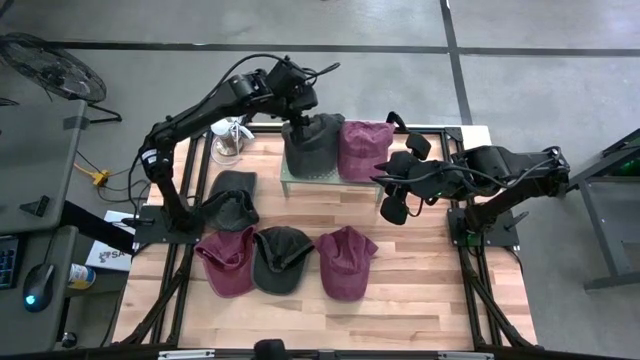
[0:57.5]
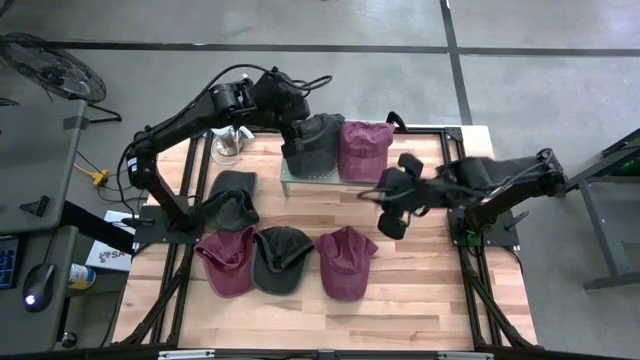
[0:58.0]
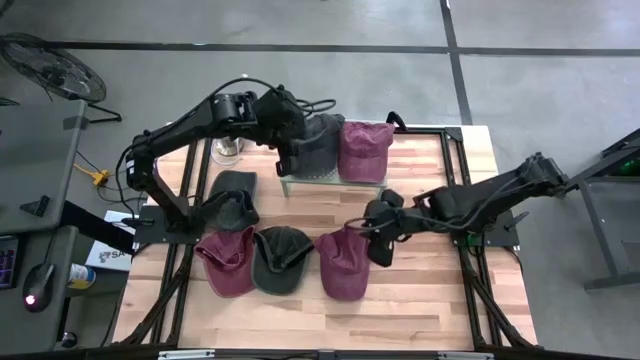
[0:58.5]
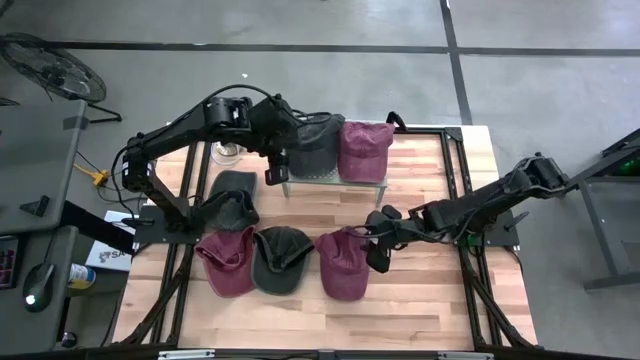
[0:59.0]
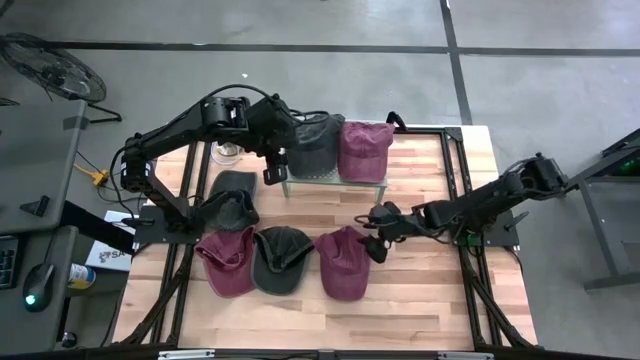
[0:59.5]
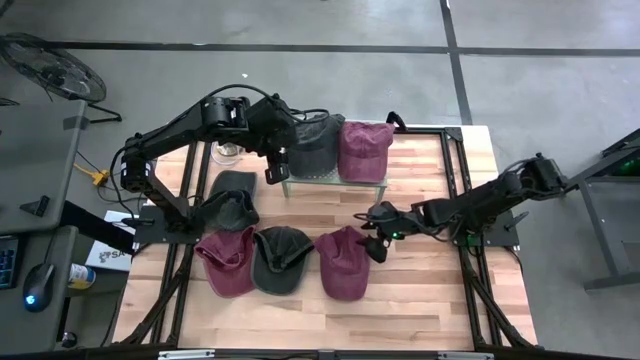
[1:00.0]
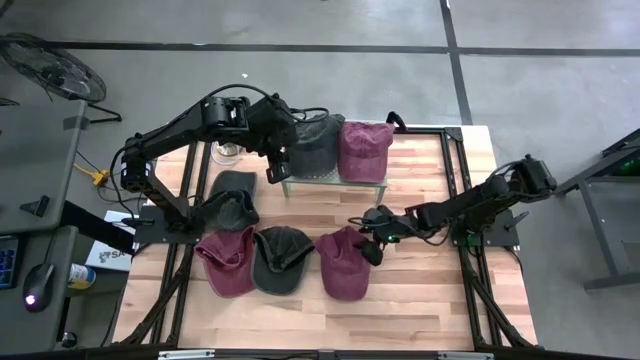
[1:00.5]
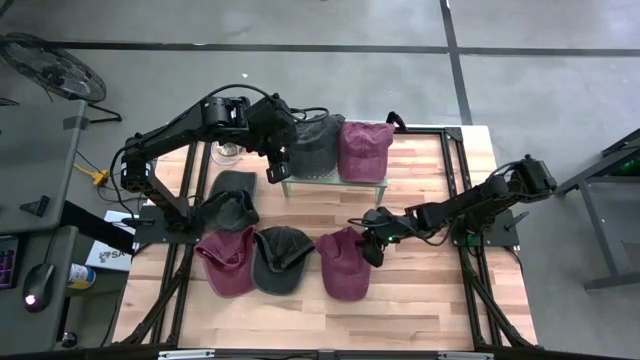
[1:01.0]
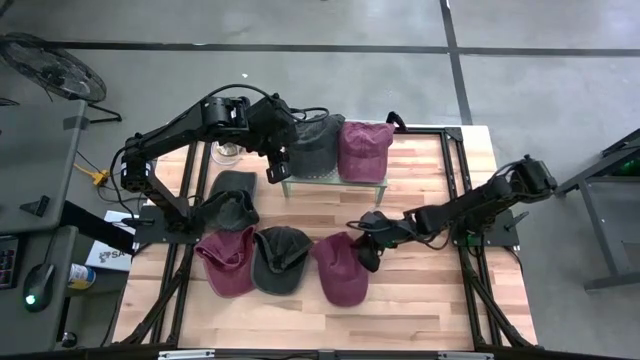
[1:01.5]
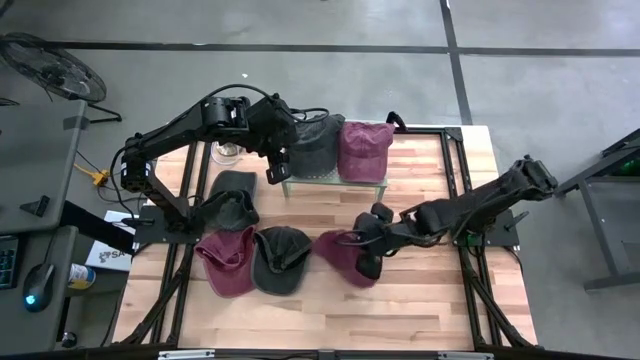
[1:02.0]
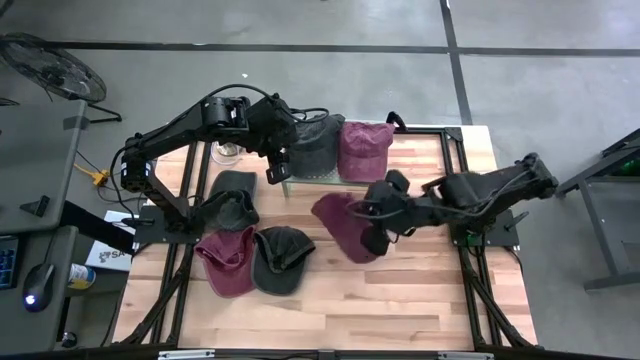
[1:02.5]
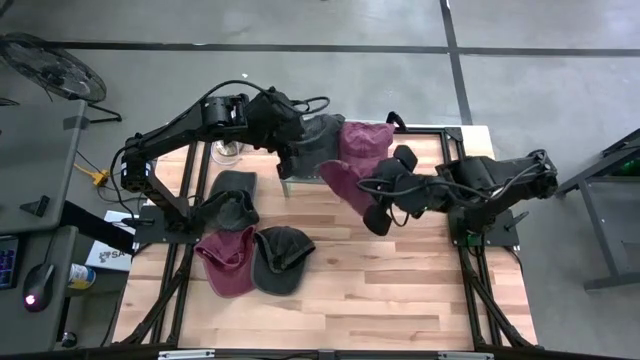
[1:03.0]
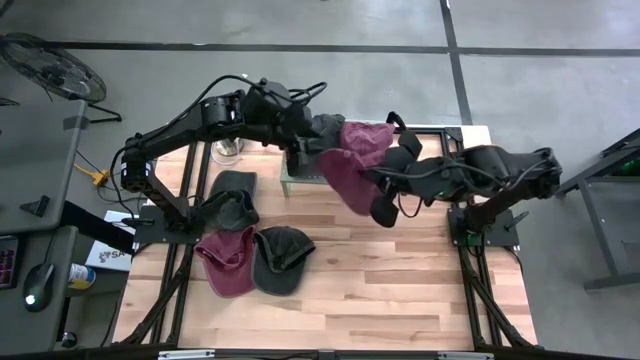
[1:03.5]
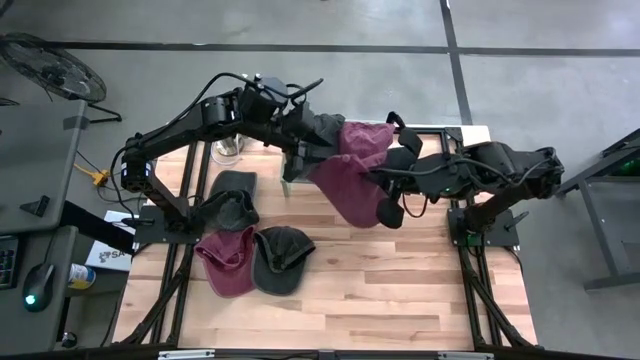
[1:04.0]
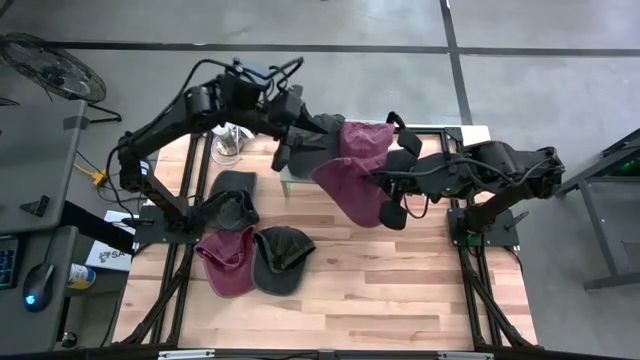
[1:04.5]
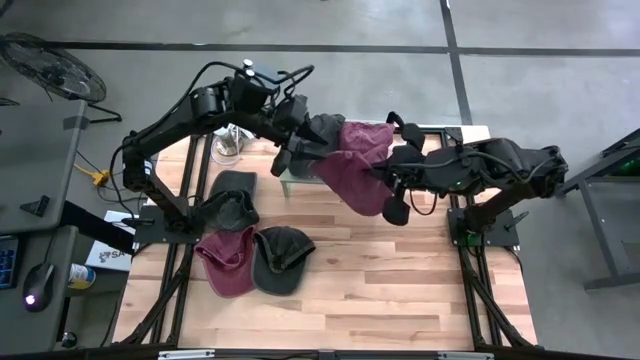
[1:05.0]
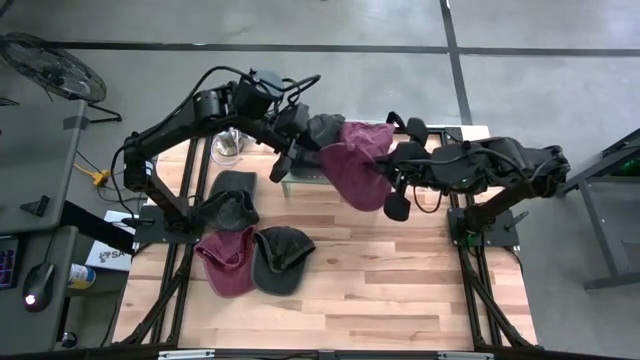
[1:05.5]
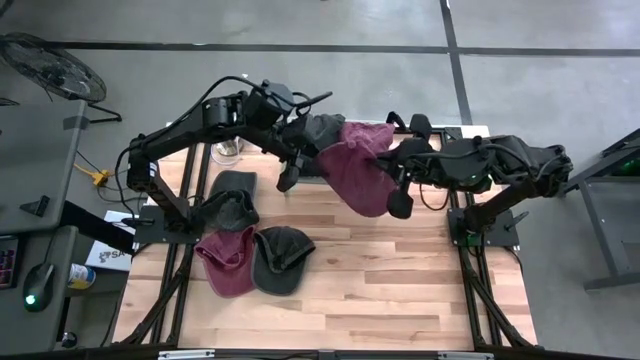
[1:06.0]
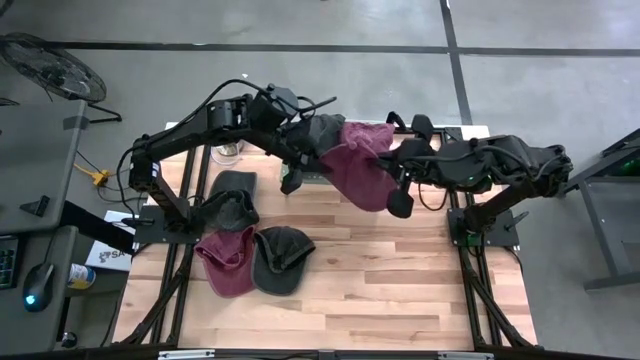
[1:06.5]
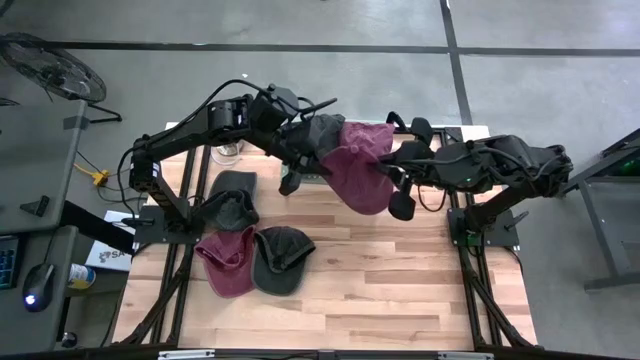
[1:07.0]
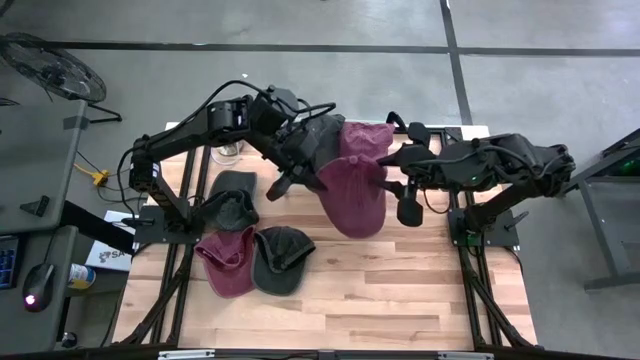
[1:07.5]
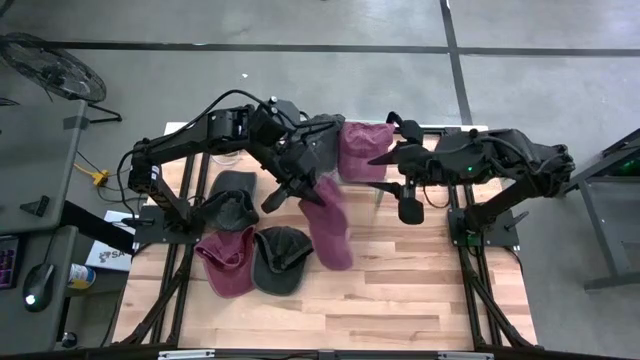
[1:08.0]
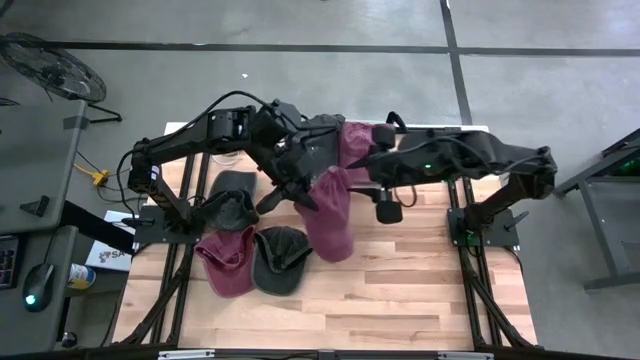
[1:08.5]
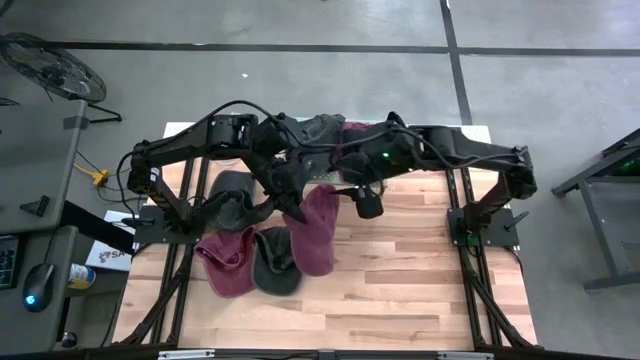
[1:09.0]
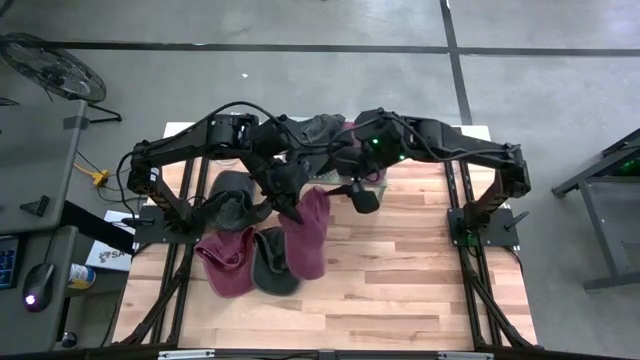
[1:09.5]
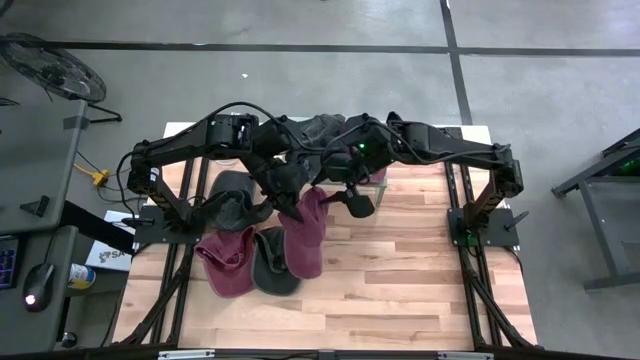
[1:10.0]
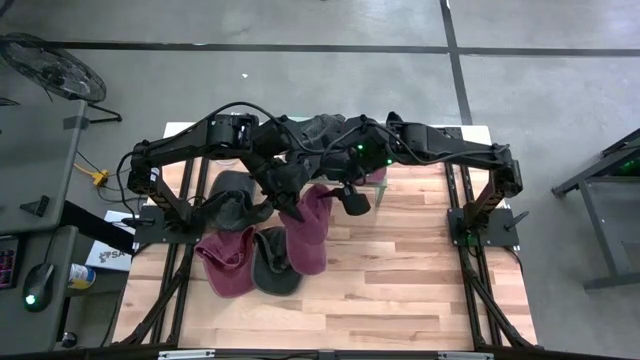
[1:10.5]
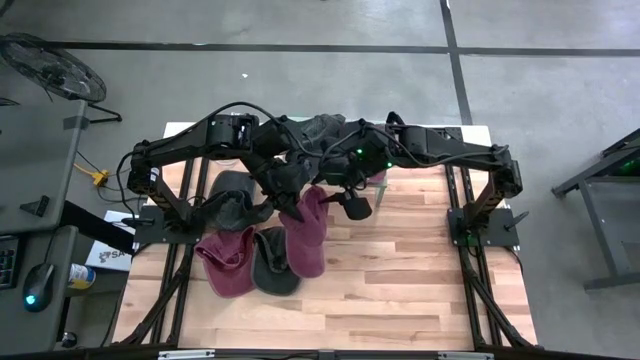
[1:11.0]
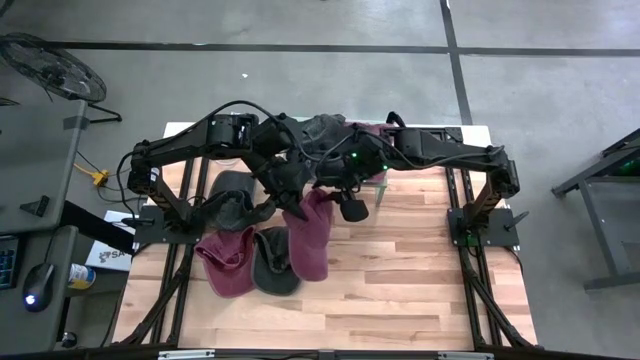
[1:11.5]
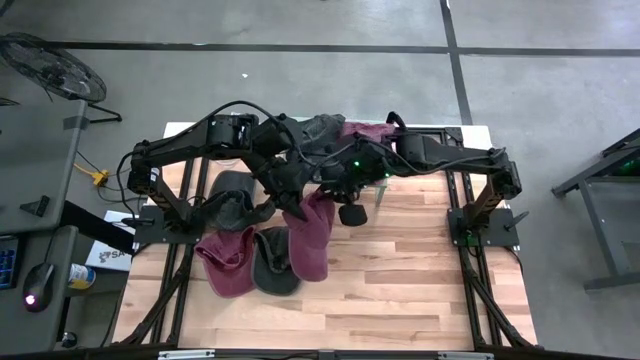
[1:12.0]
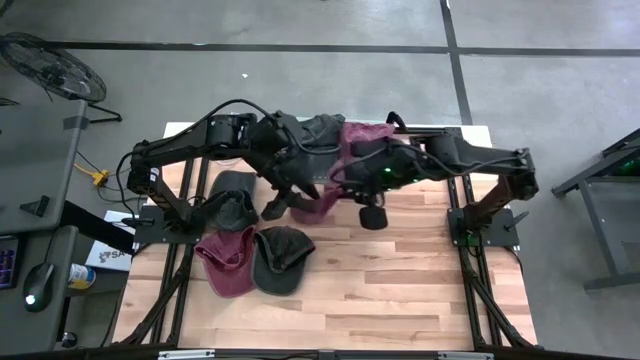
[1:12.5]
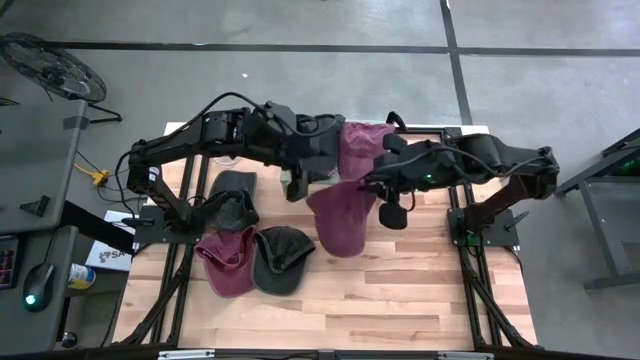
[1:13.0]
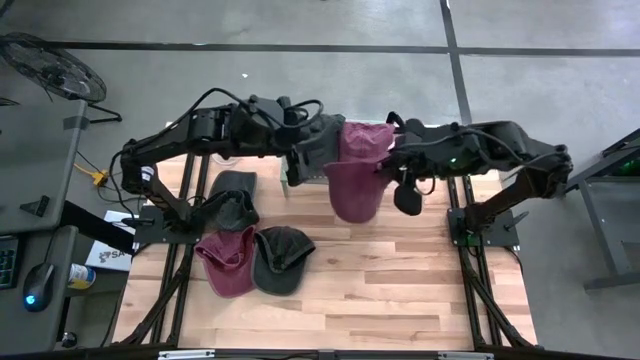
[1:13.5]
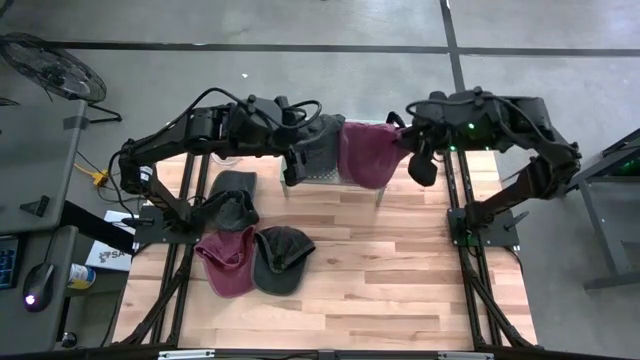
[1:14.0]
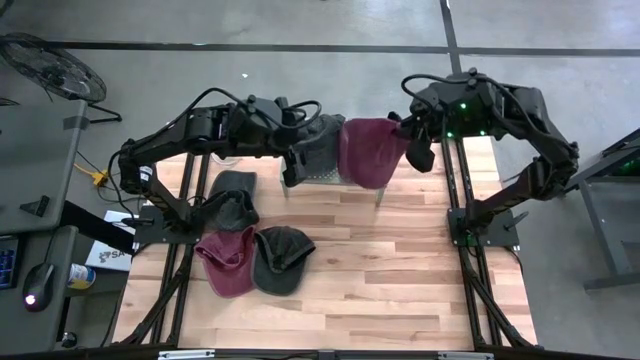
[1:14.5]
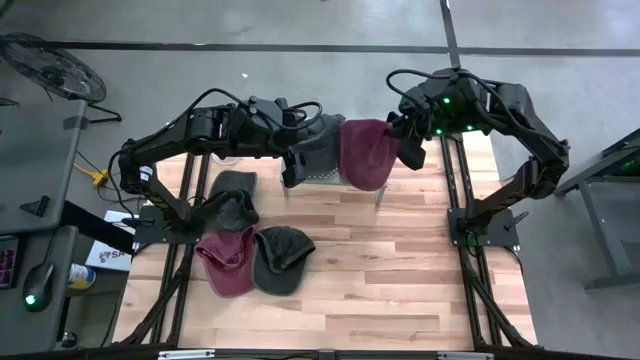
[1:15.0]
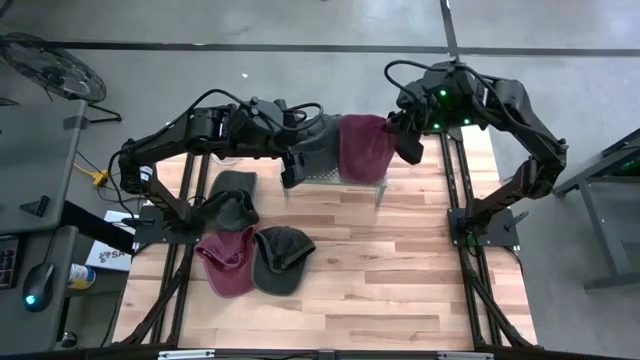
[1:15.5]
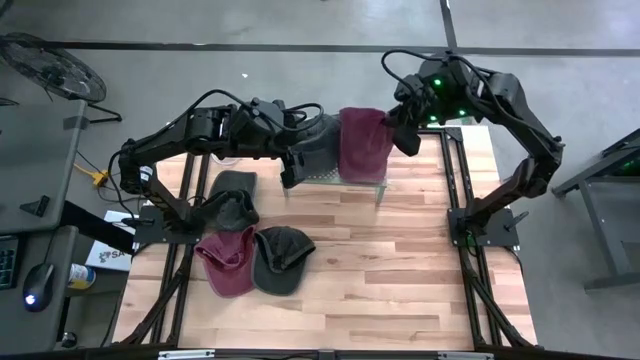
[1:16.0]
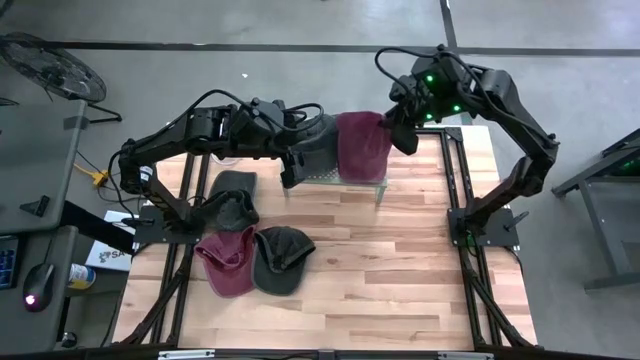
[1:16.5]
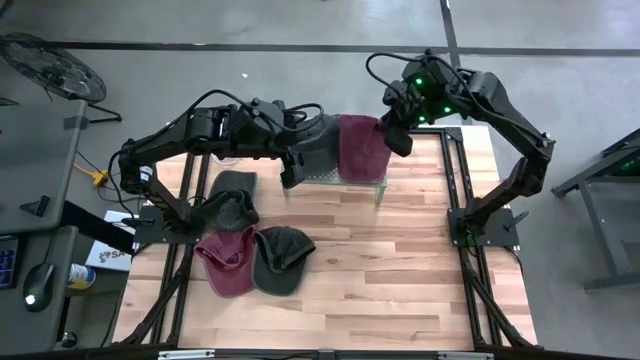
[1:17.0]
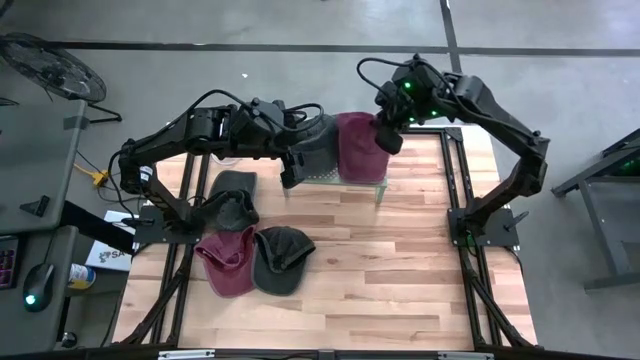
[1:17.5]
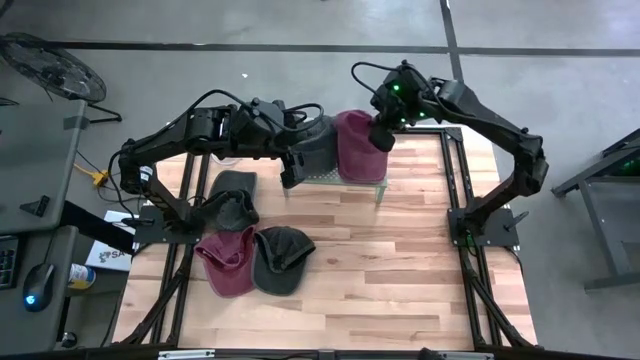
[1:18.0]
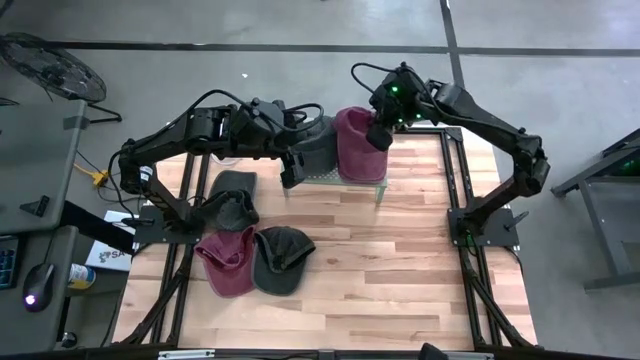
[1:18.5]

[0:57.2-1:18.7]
Task: Pick & Place hat
Stack the right dark red cap on the other dark red cap on the shelf
